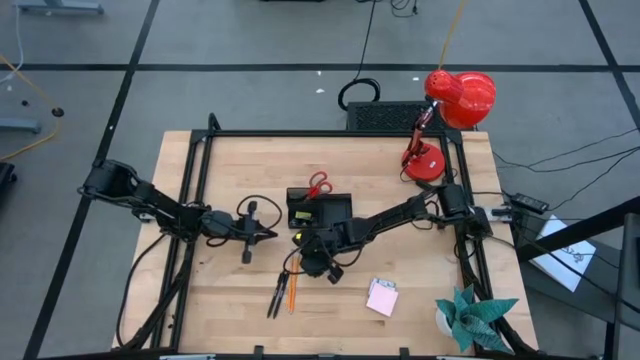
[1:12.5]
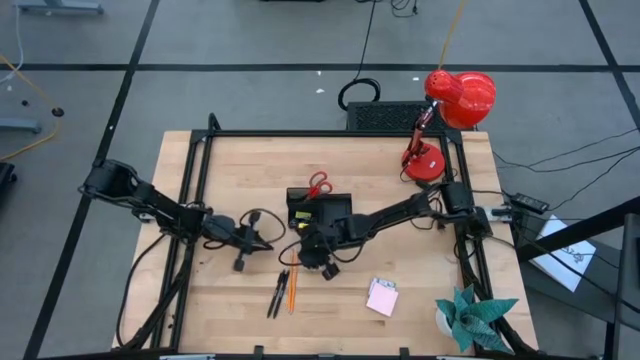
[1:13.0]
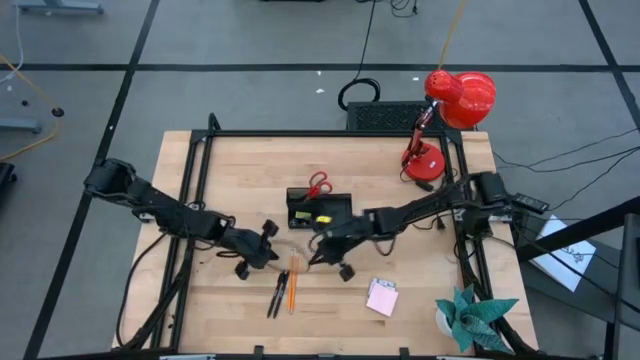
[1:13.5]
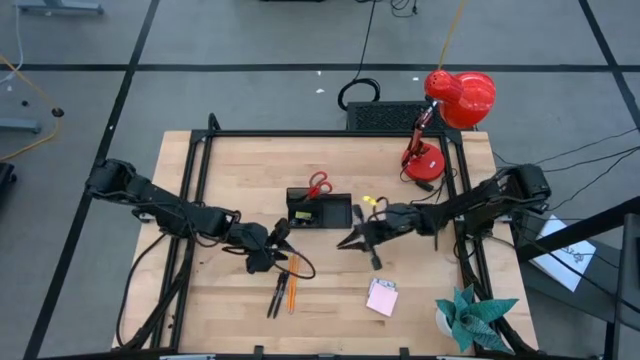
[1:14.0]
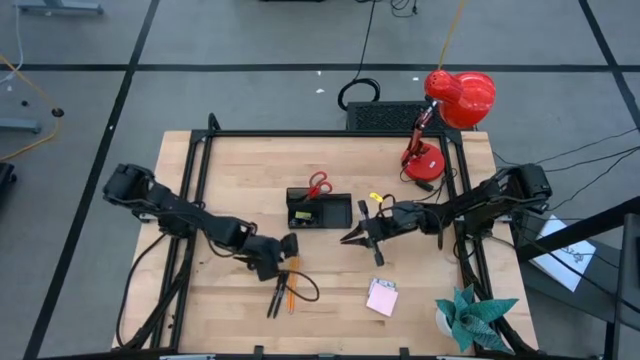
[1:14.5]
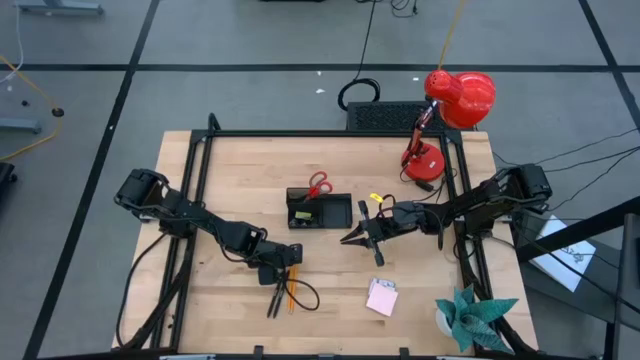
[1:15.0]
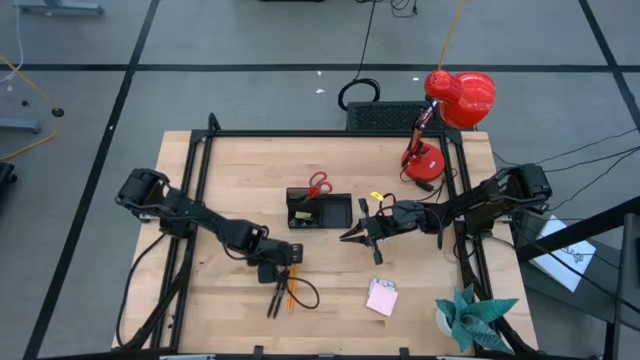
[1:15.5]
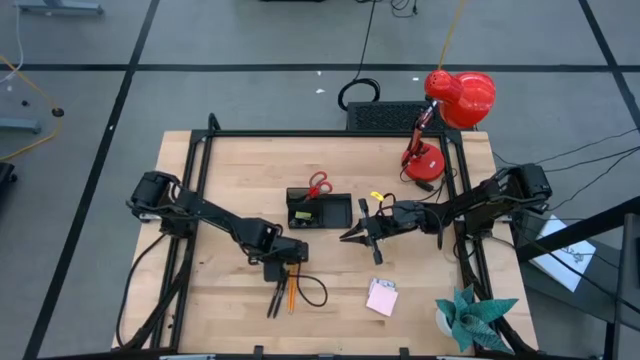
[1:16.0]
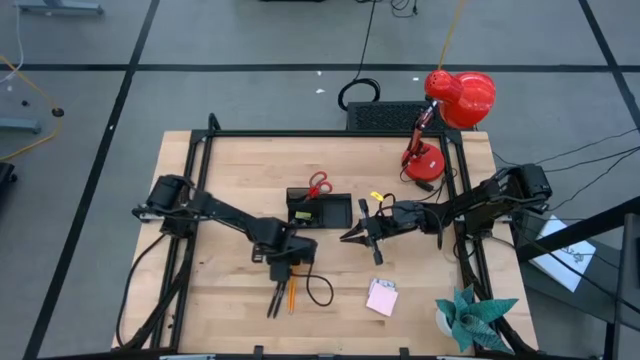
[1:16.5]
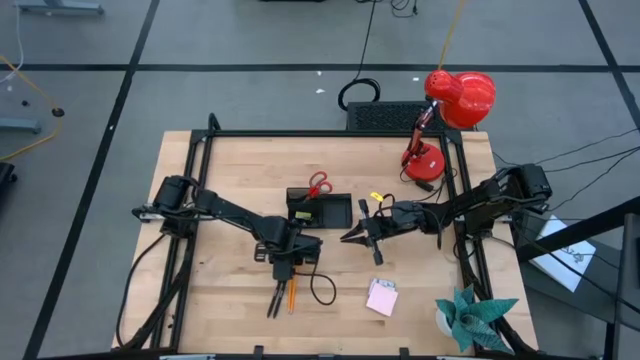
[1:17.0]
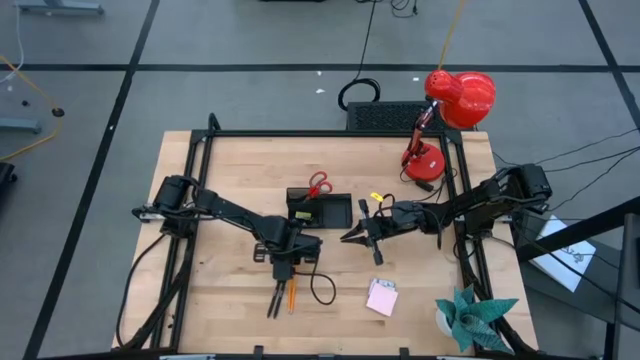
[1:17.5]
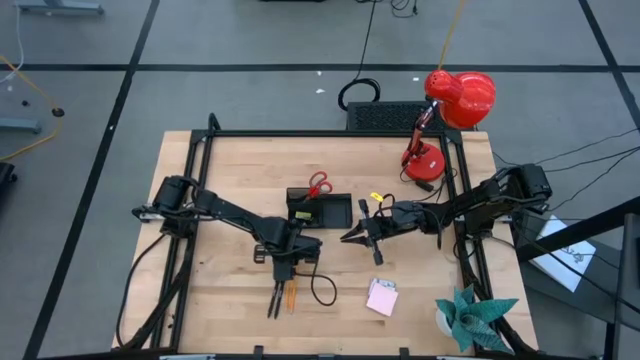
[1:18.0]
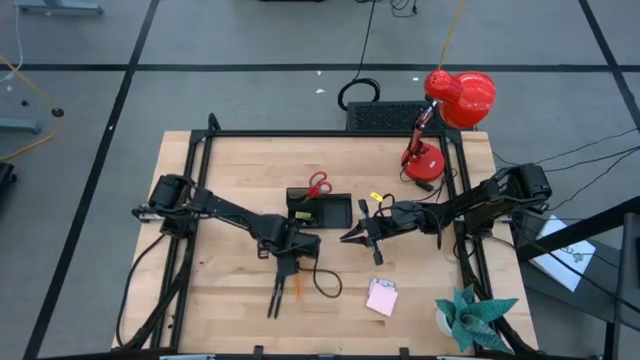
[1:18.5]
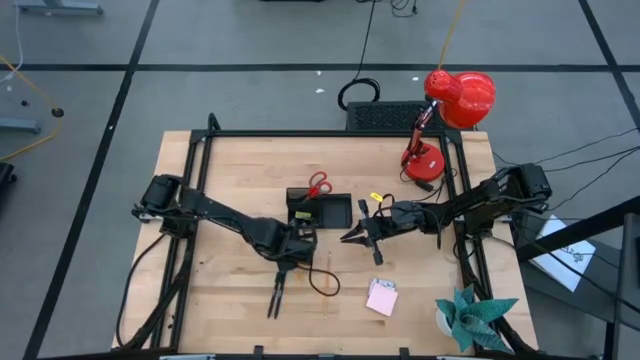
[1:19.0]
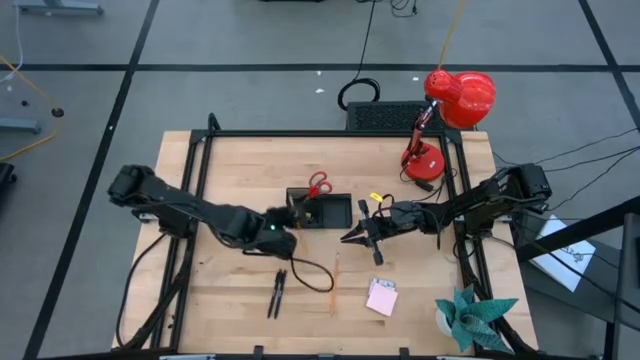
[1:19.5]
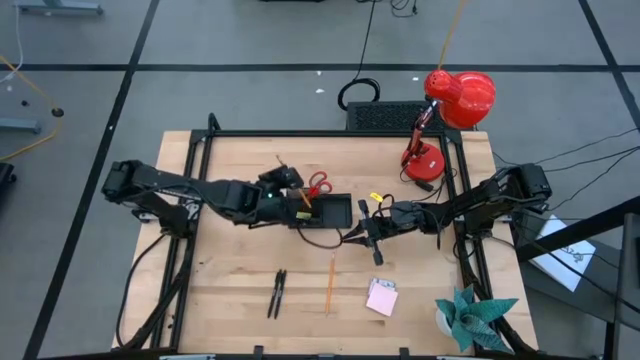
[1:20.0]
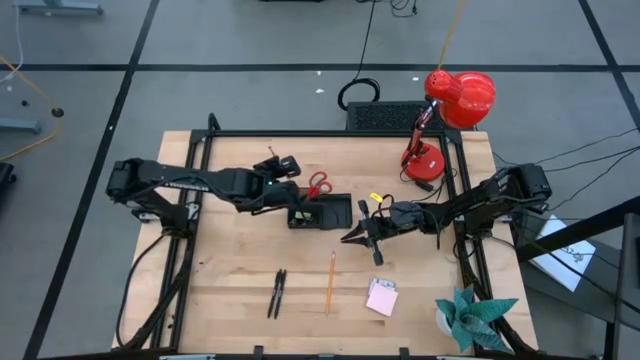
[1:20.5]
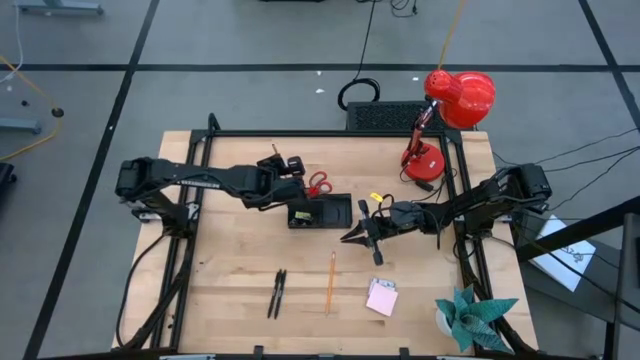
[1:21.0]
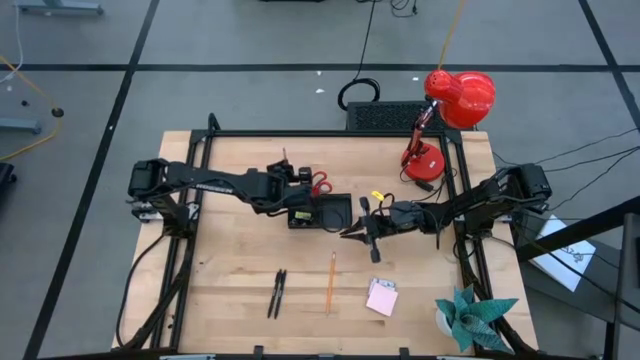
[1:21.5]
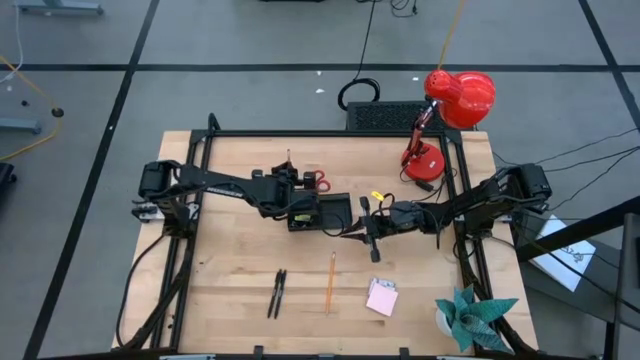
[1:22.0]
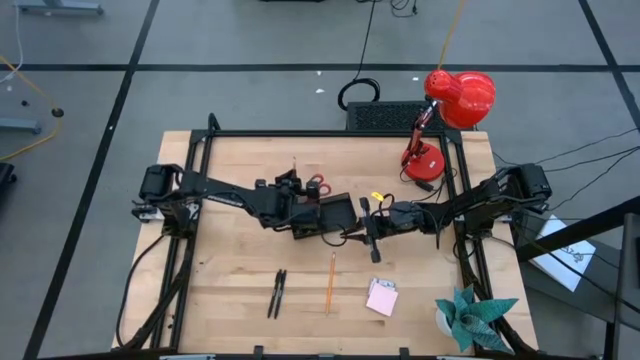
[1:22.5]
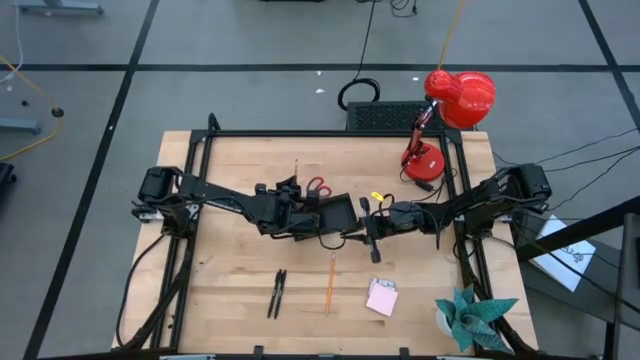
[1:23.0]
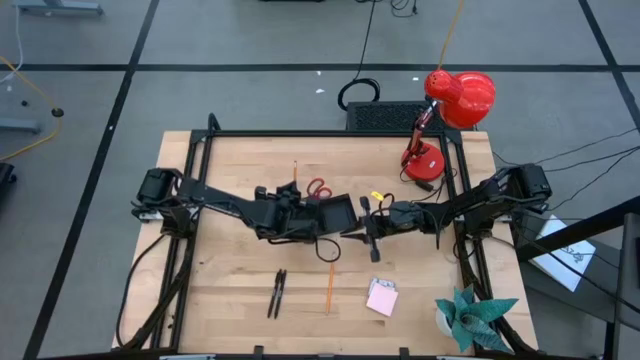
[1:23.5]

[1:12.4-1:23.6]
Task: Pick and place office supplies into organizer
Put the orange pencil into the desk organizer

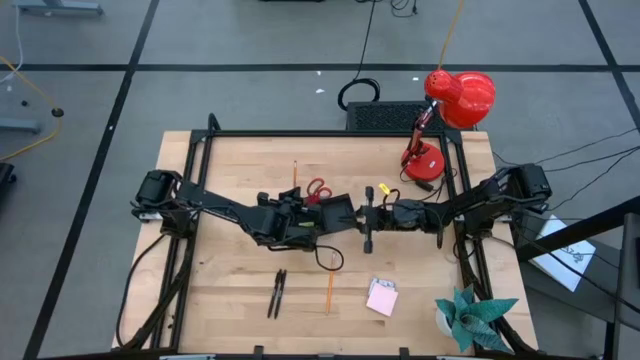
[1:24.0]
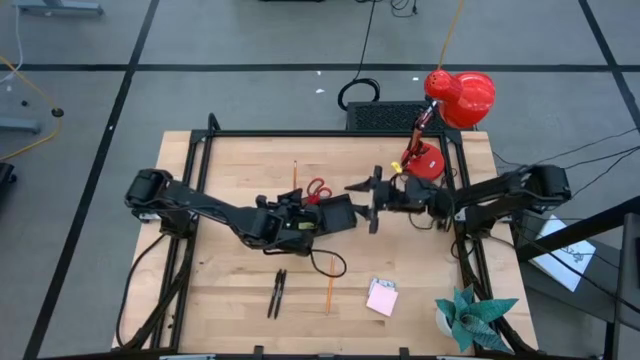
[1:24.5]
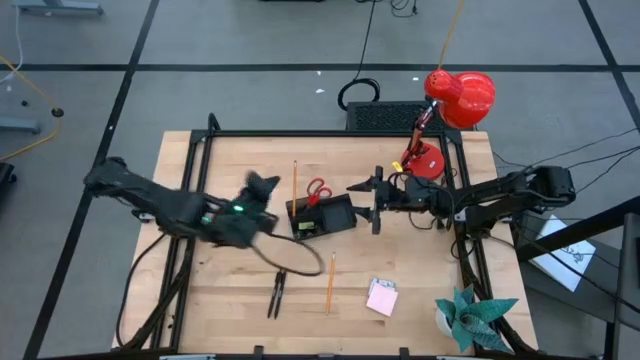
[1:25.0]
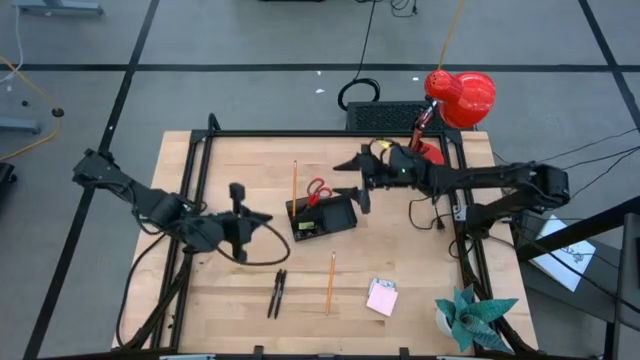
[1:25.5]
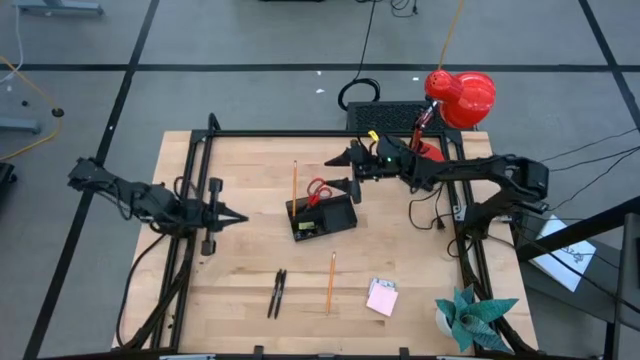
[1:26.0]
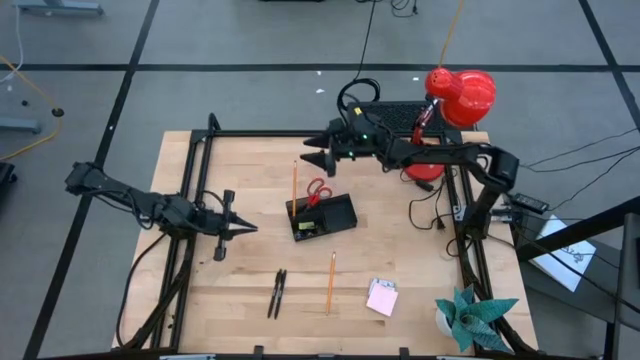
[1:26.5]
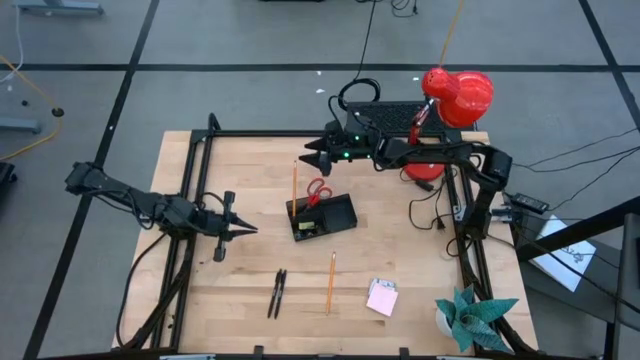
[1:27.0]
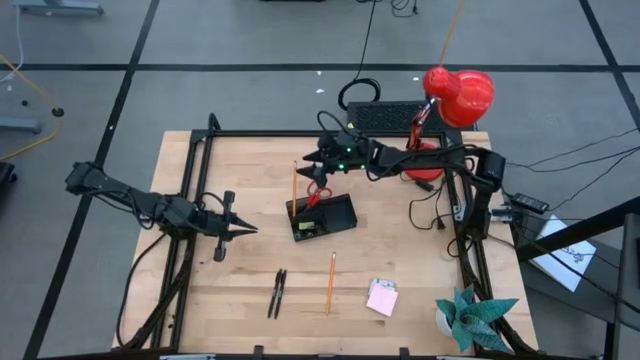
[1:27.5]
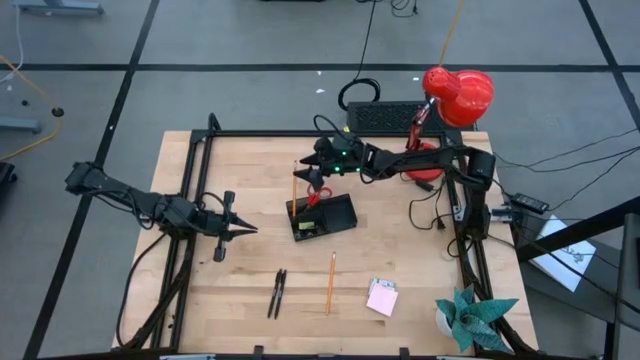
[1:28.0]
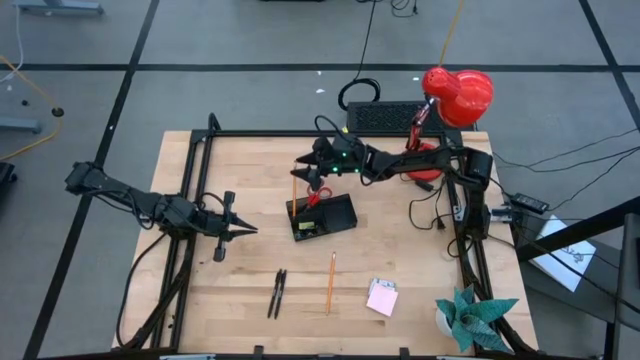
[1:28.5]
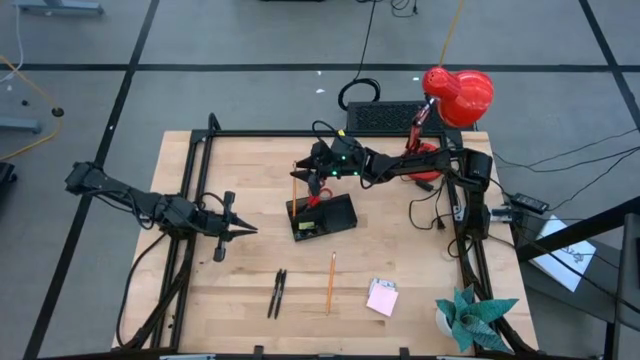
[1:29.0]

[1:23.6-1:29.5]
Put the orange pencil into the desk organizer

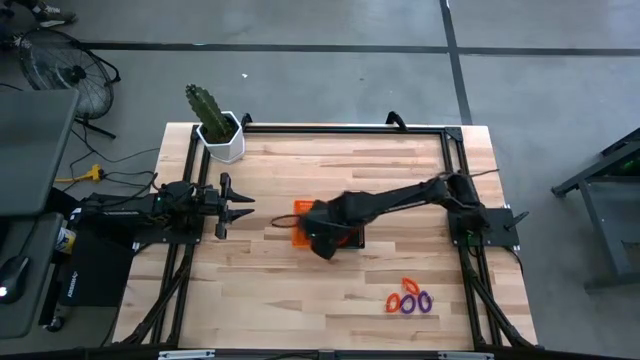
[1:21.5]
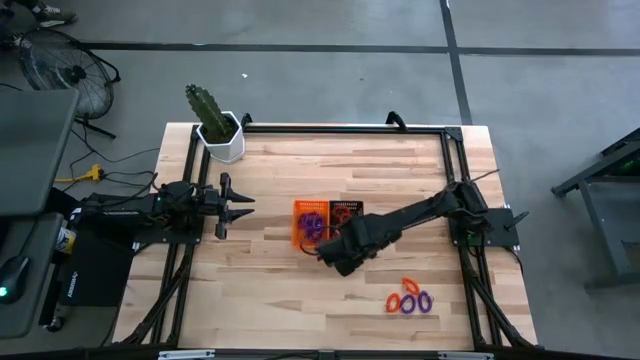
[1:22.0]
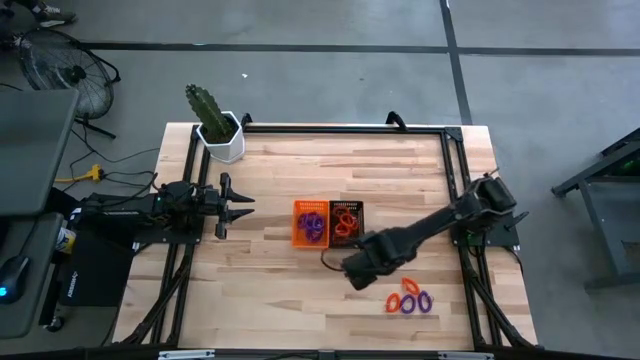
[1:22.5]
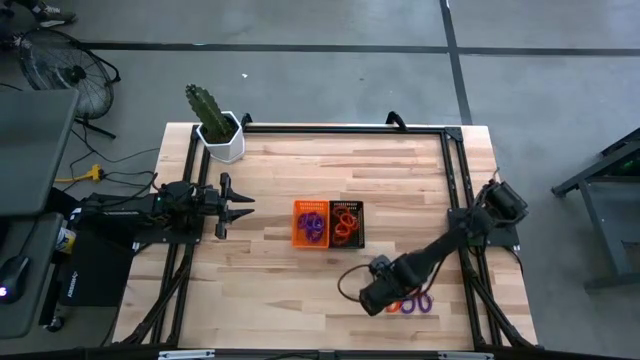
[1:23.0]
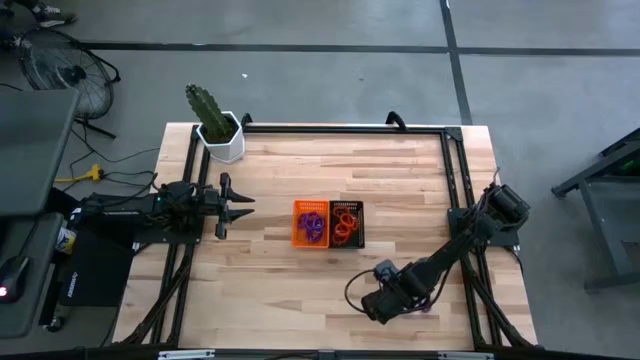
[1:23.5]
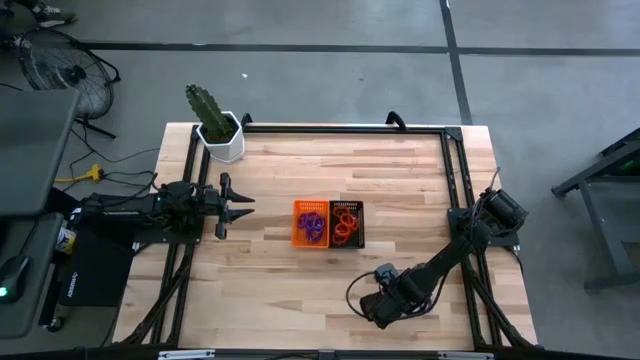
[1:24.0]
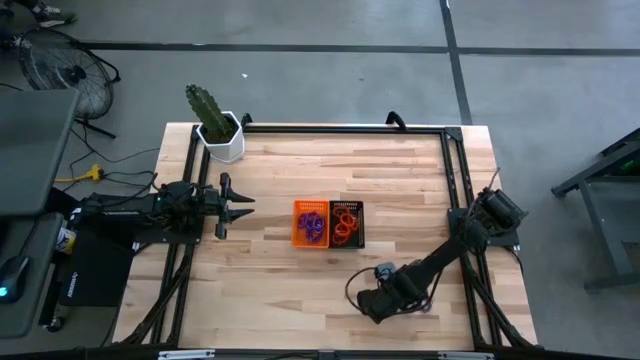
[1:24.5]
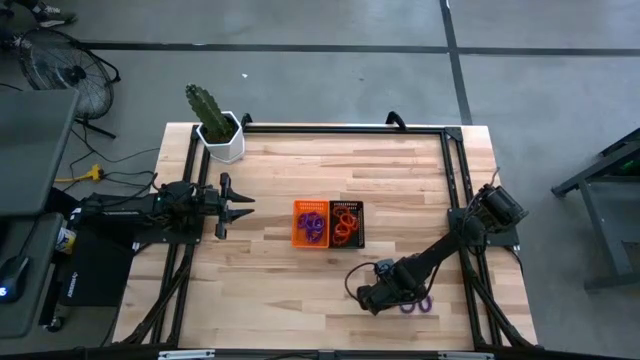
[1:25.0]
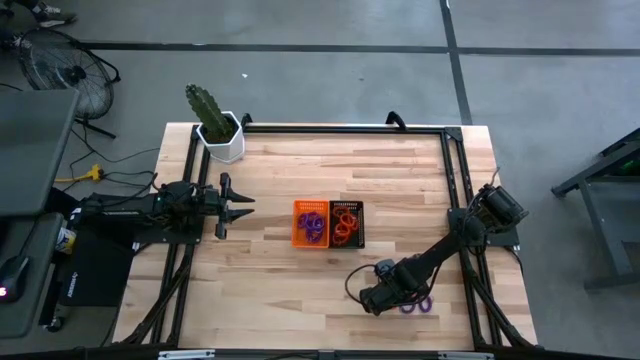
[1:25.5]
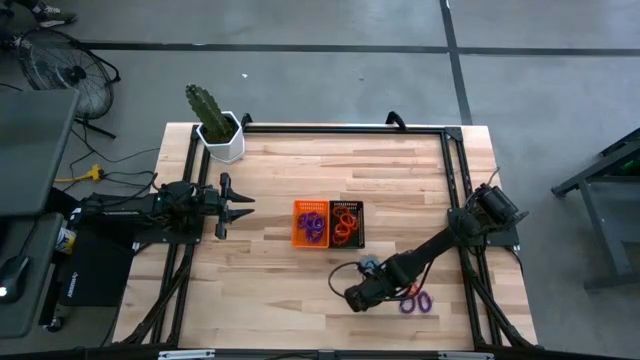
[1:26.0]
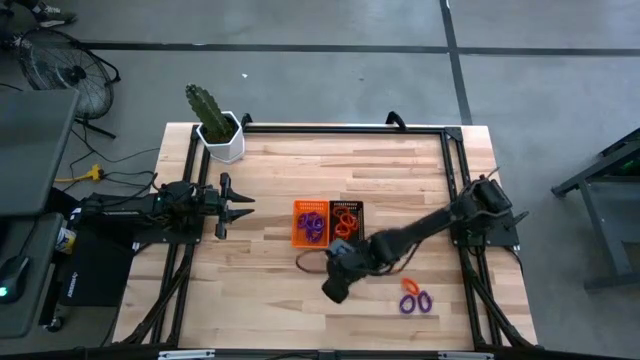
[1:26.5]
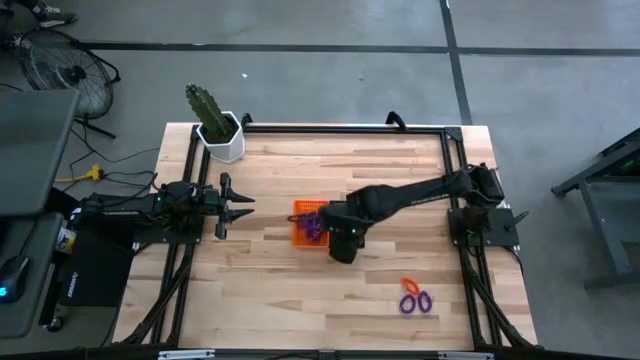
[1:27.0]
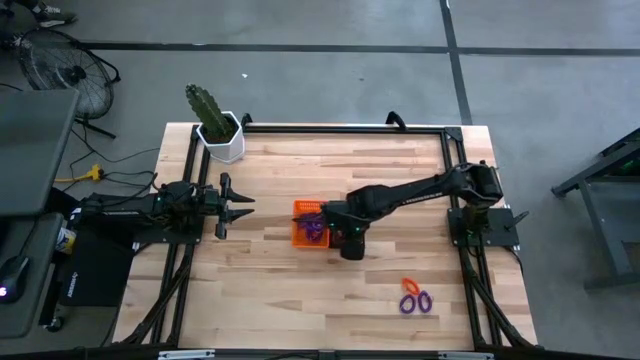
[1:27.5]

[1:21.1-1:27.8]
Task: Sort spring keychains
Put the orange spring keychain into the black bin
